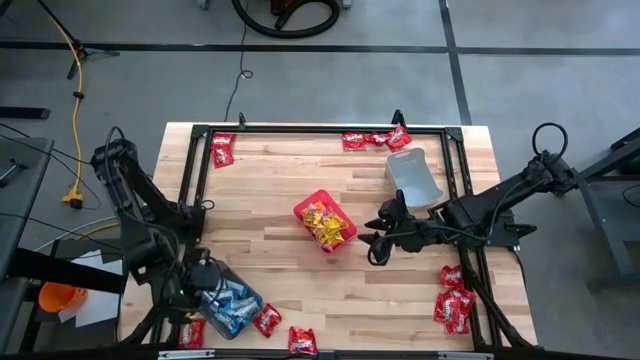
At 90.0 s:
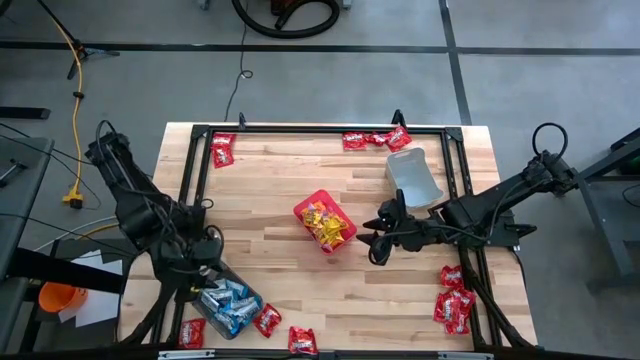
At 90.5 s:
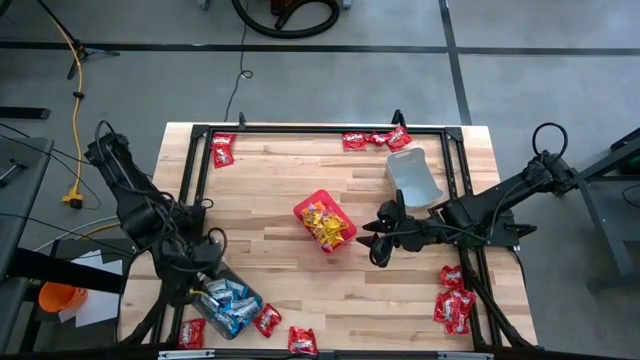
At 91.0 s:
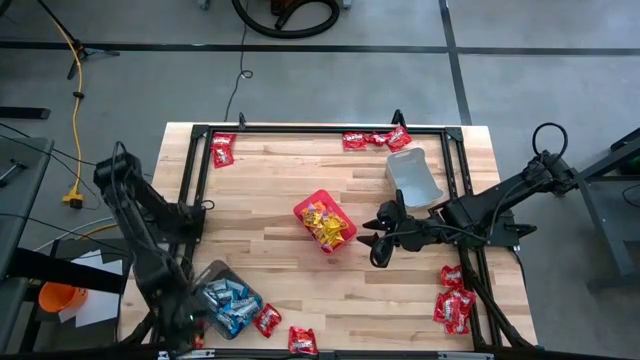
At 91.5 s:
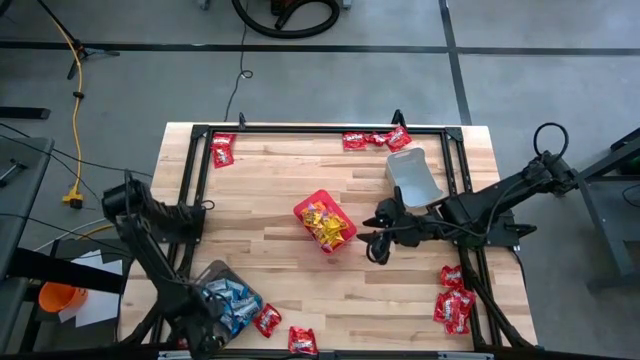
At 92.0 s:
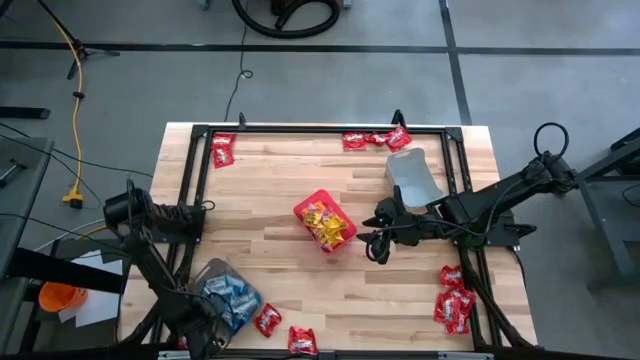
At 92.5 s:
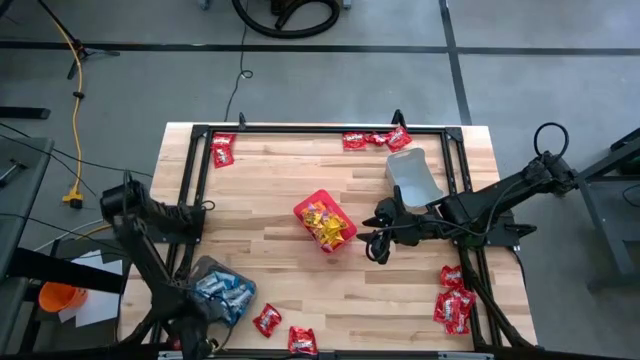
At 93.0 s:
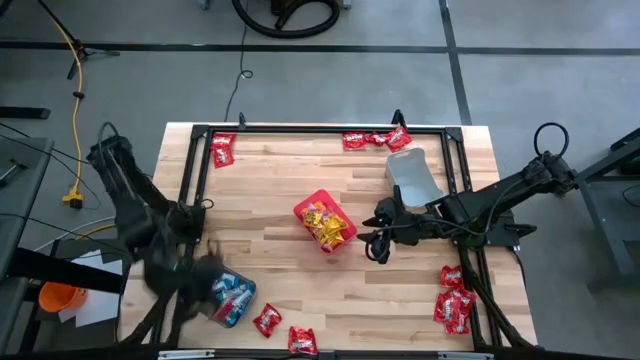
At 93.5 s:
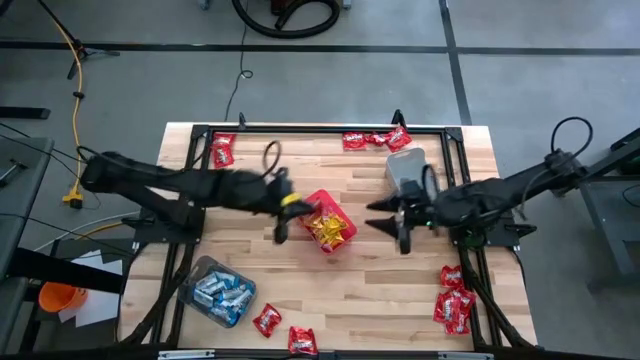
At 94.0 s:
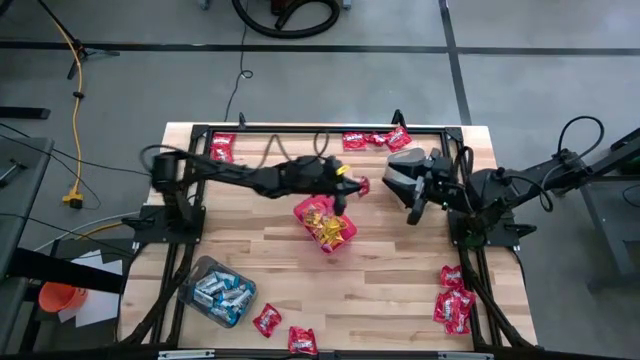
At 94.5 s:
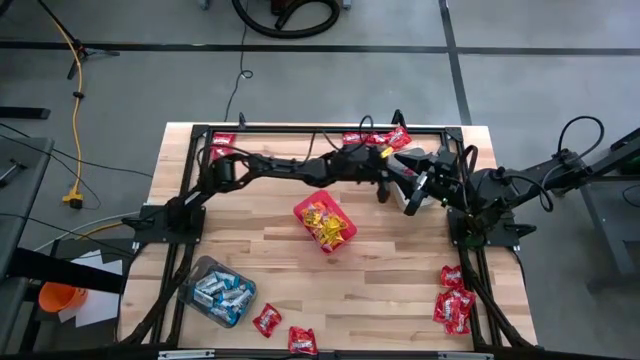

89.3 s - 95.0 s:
Task: Sort candy
Put the red candy into the gray bin

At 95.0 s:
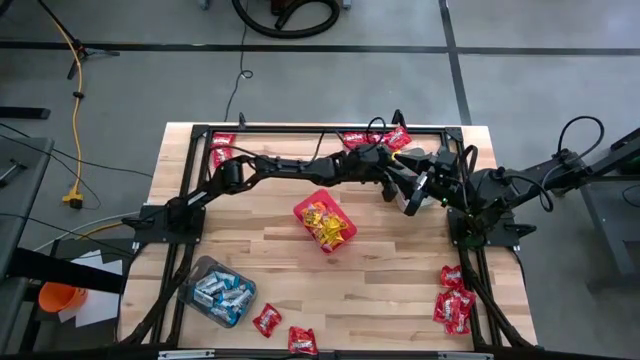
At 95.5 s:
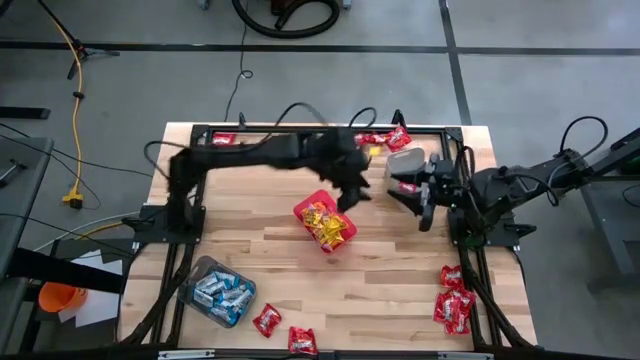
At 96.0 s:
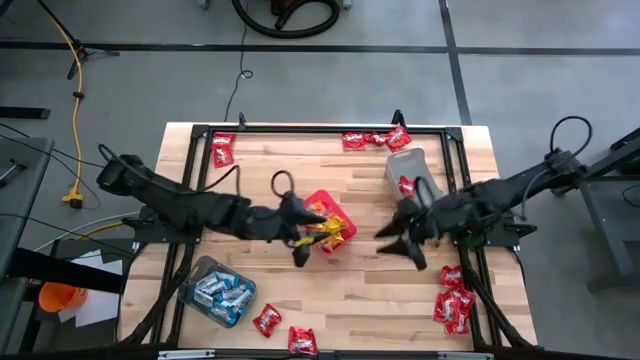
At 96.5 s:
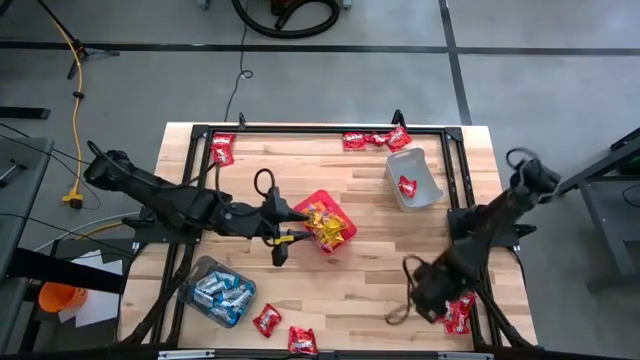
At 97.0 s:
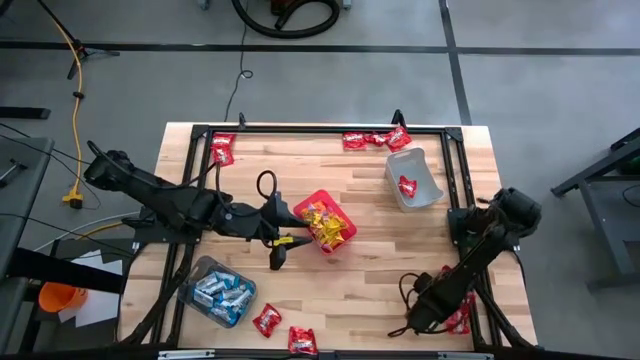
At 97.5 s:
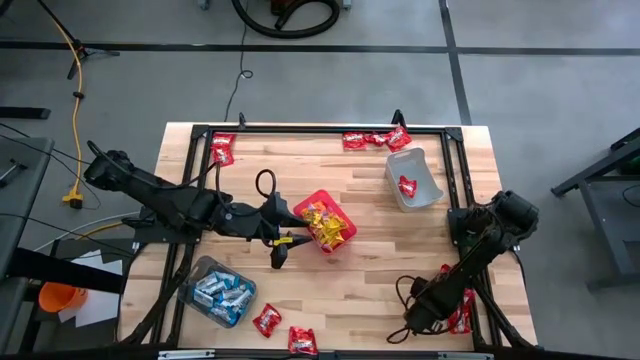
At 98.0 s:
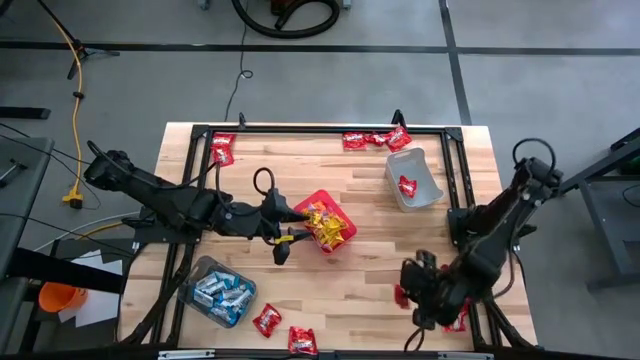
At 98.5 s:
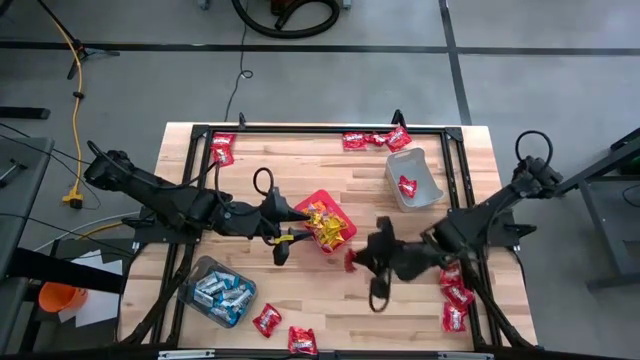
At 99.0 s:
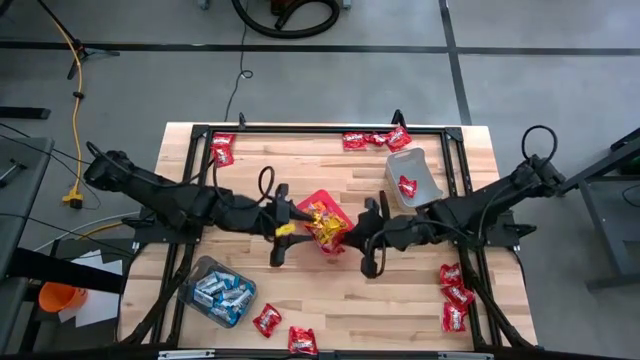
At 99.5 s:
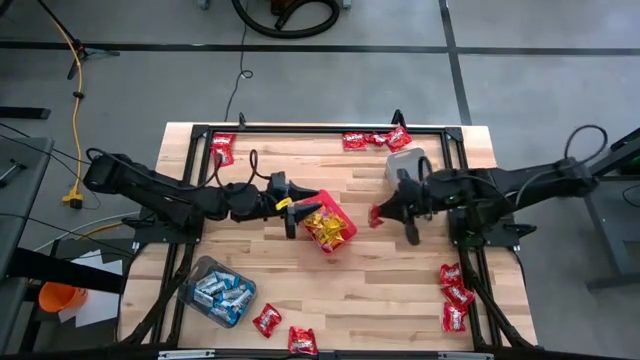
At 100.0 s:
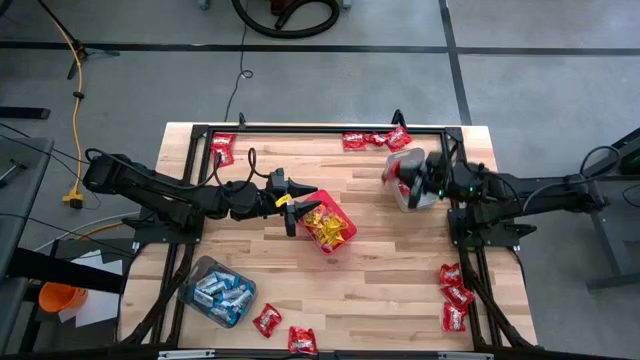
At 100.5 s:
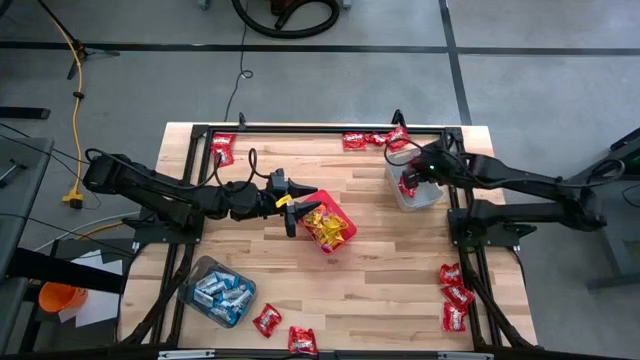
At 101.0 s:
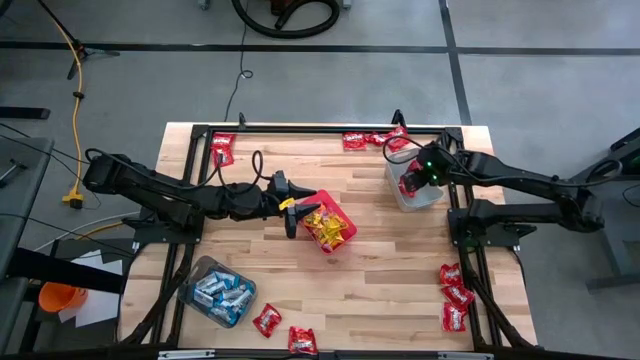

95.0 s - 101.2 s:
Put the red candy into the gray bin

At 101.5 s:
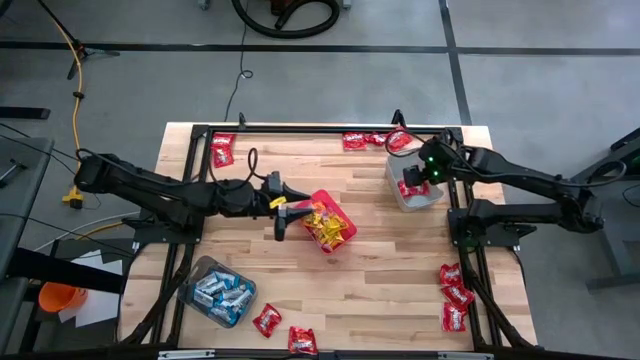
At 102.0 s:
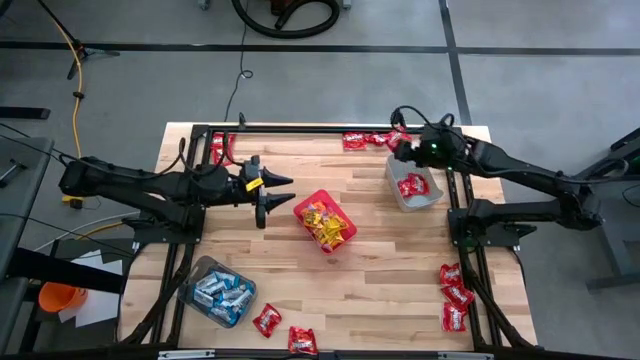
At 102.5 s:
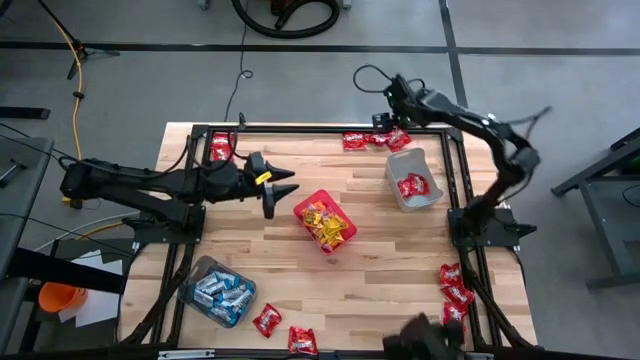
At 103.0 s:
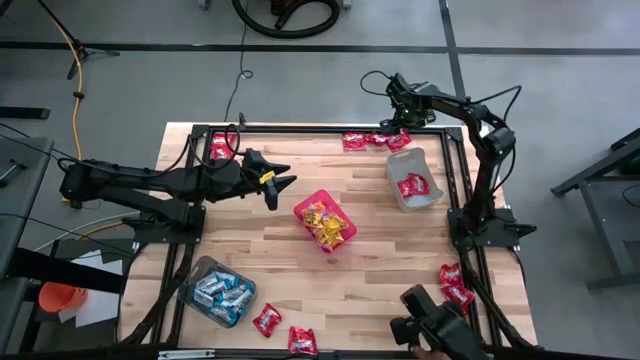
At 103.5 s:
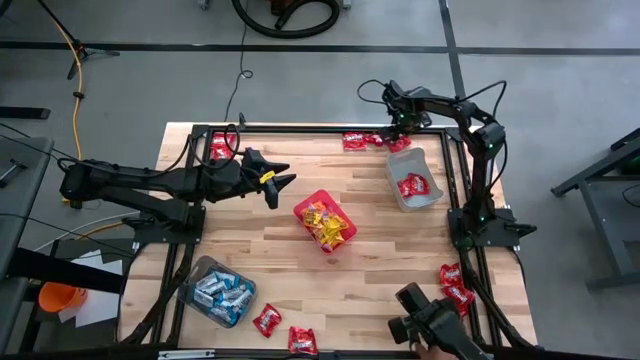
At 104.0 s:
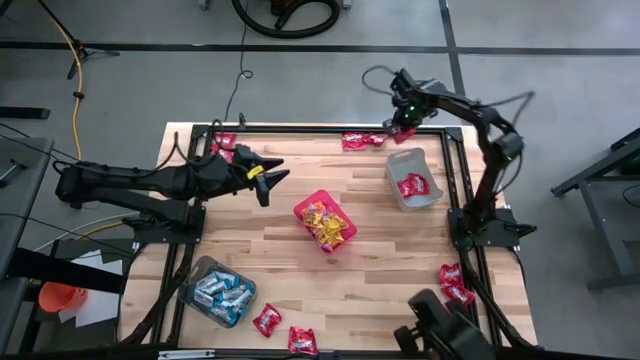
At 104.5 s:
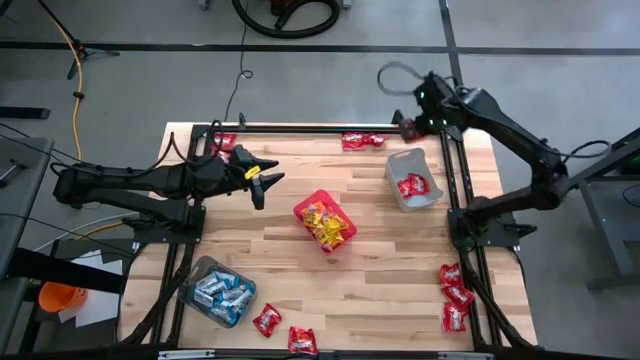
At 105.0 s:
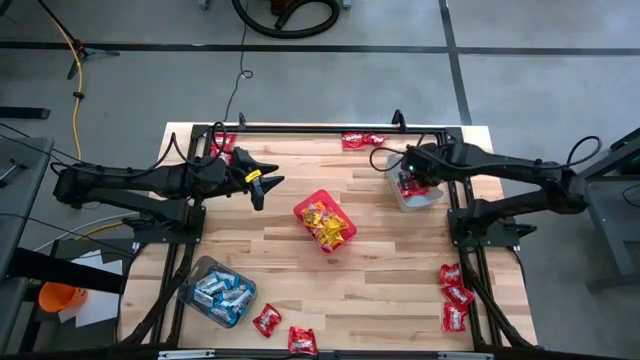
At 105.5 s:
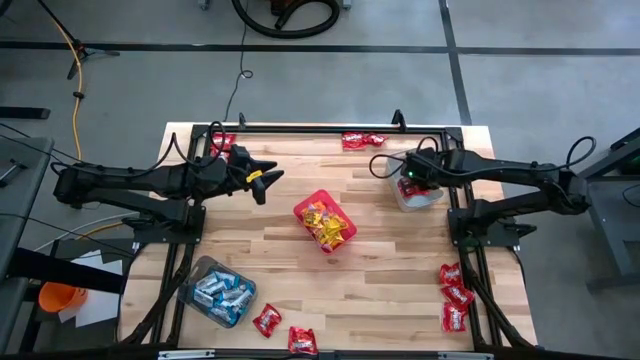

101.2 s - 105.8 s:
Put the red candy into the gray bin

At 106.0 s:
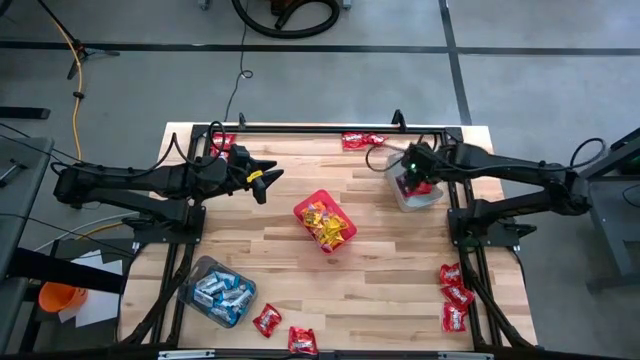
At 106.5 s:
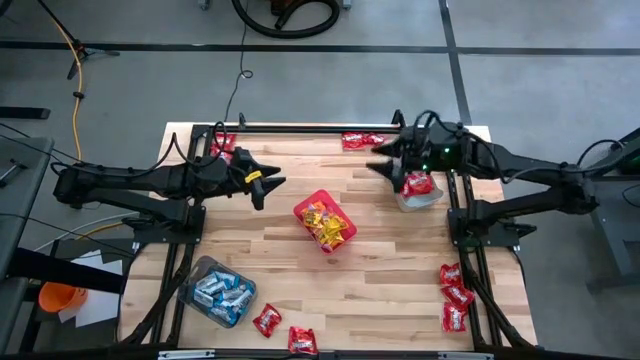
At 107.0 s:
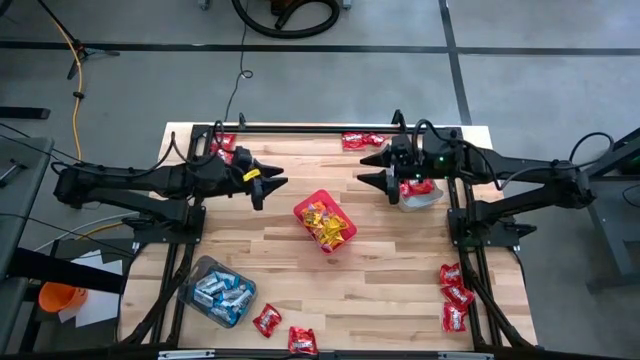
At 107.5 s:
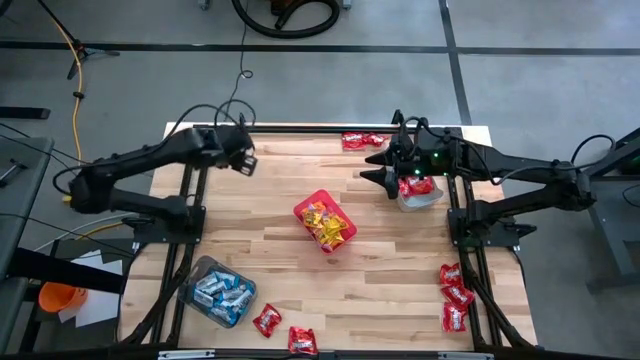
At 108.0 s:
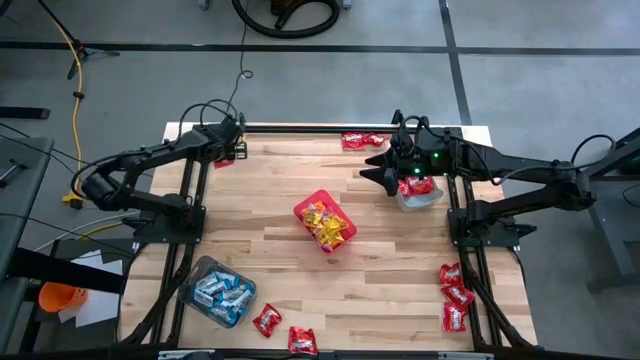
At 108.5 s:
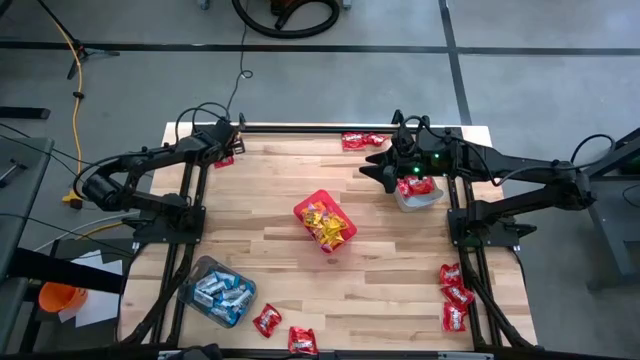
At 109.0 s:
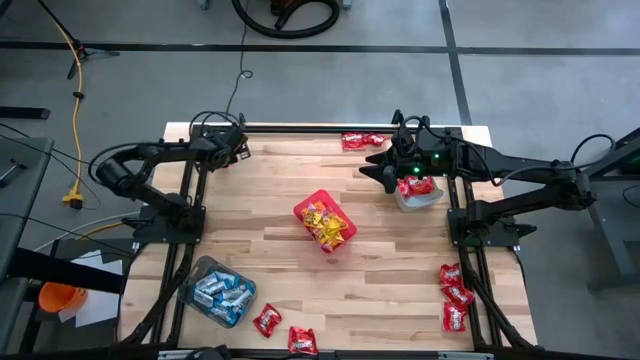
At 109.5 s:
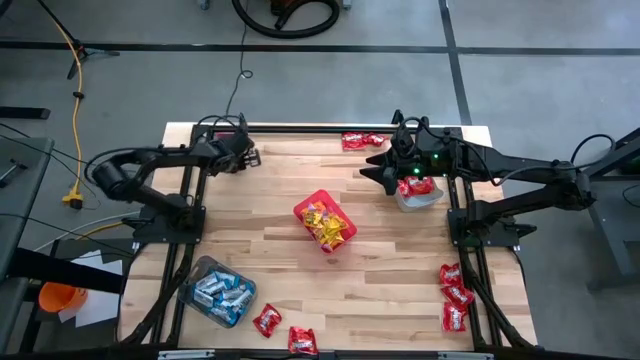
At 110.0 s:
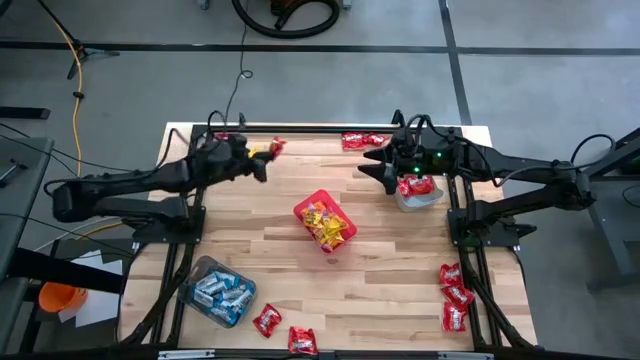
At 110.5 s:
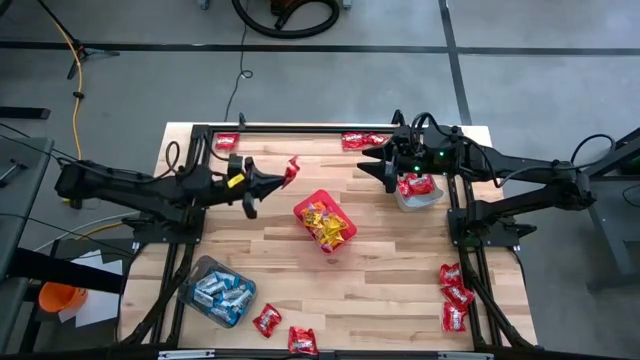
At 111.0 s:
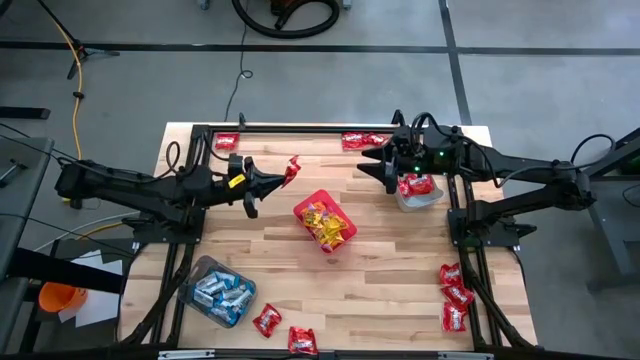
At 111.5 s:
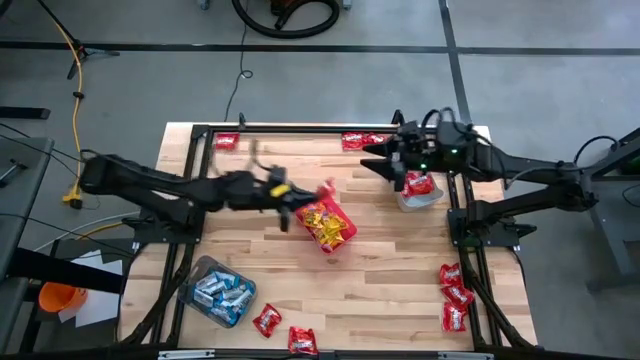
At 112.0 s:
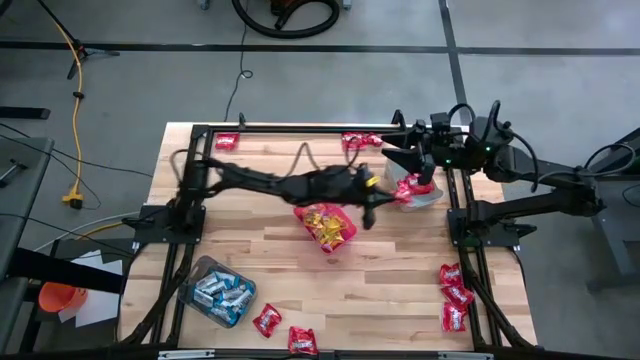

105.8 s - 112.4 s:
Put the red candy into the gray bin
